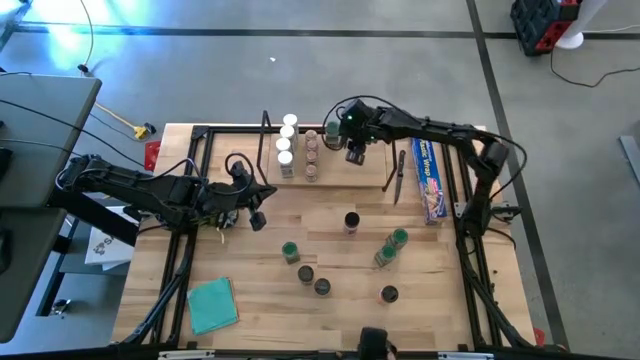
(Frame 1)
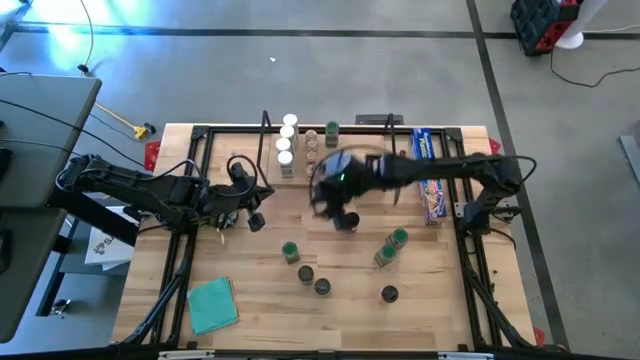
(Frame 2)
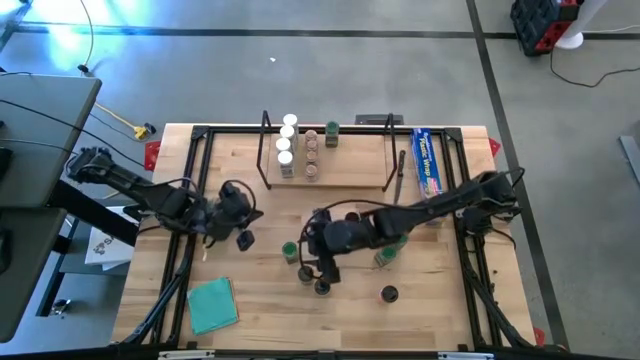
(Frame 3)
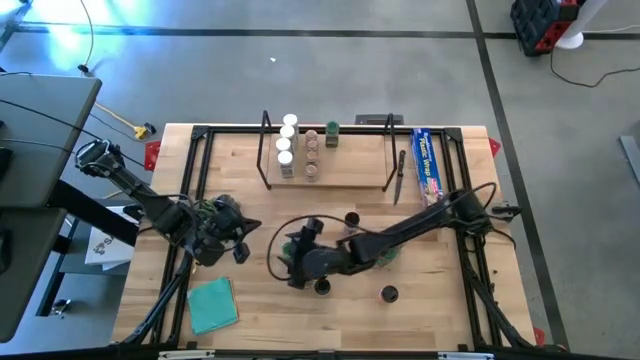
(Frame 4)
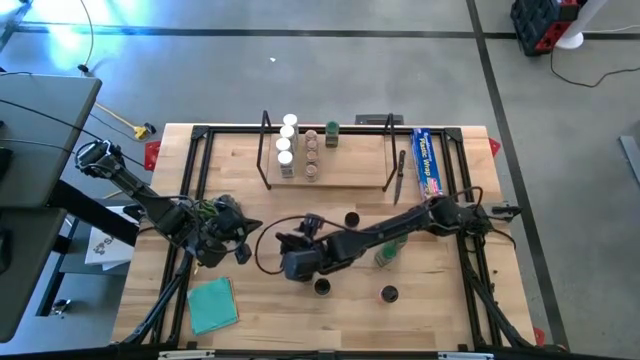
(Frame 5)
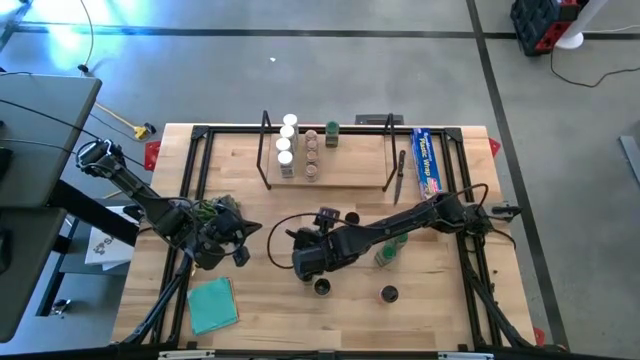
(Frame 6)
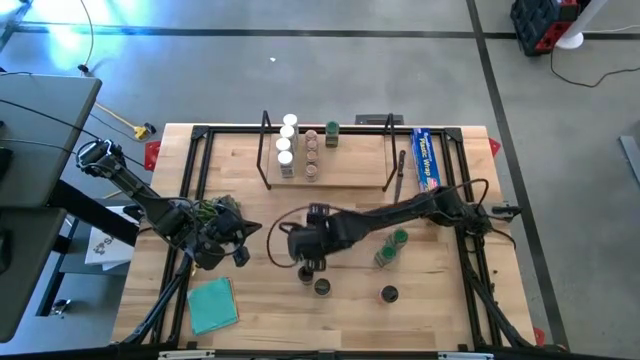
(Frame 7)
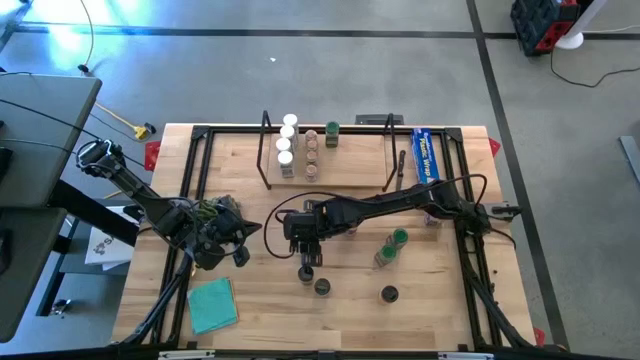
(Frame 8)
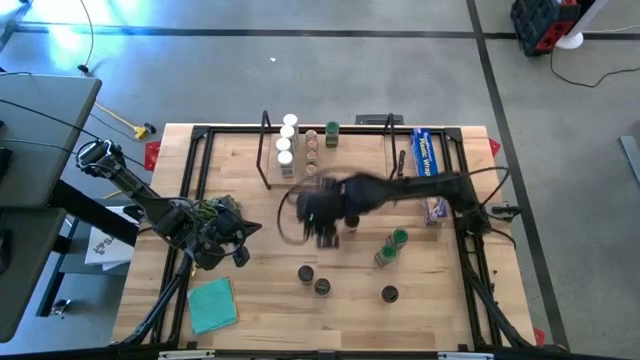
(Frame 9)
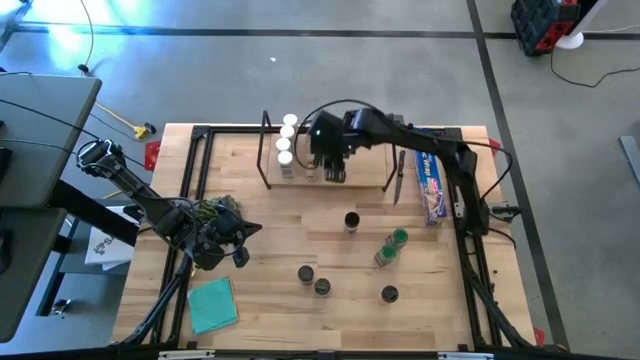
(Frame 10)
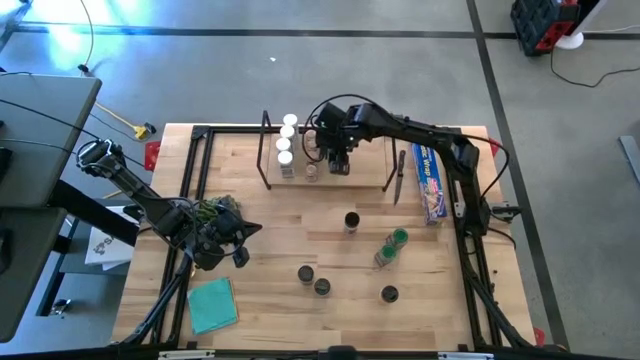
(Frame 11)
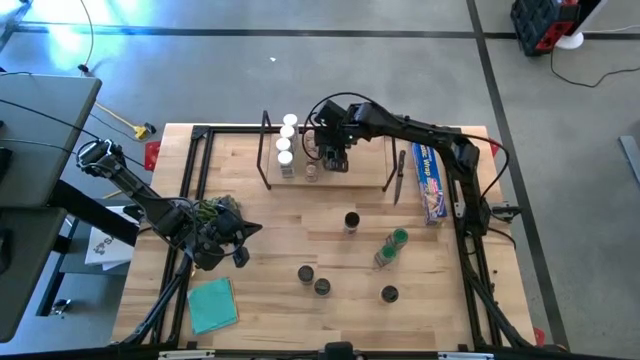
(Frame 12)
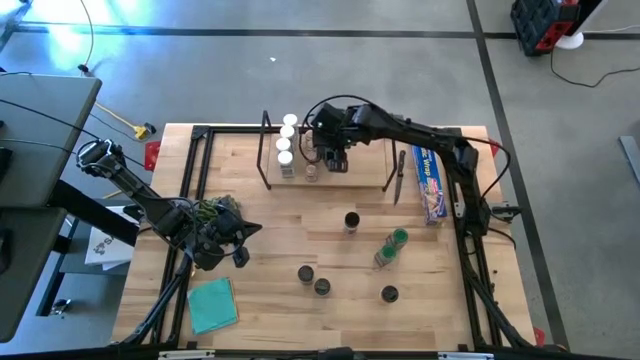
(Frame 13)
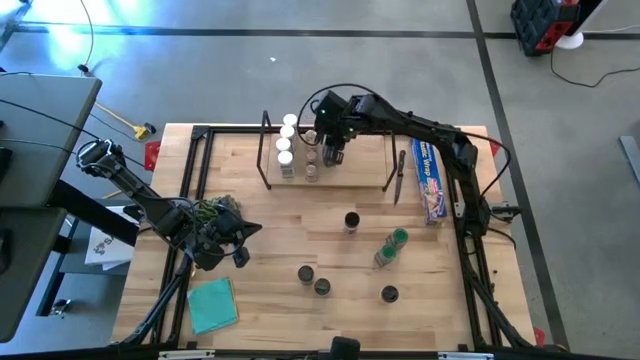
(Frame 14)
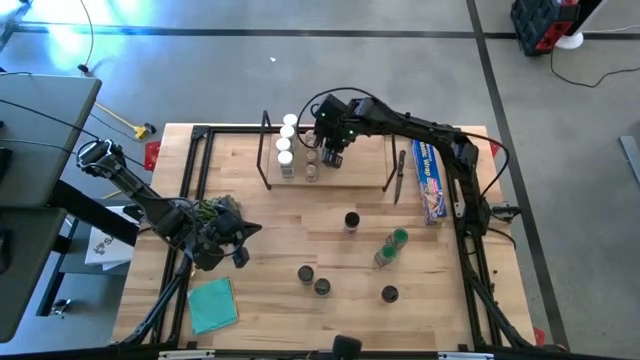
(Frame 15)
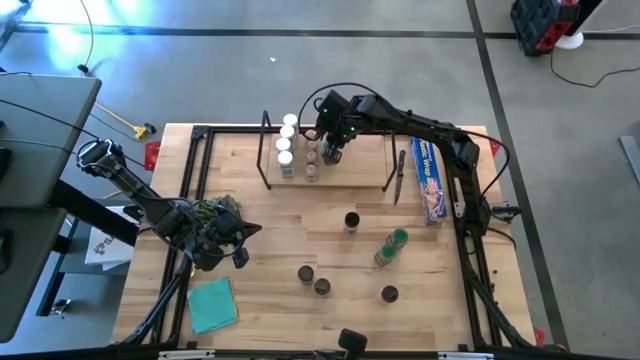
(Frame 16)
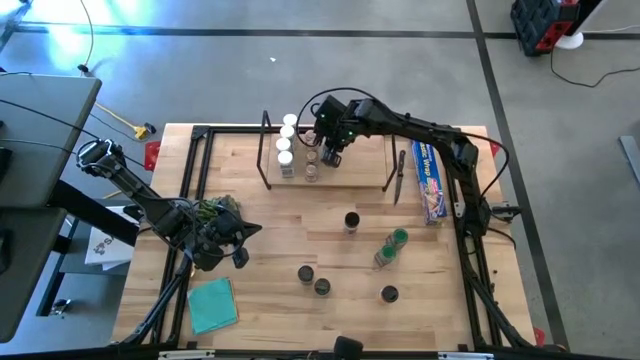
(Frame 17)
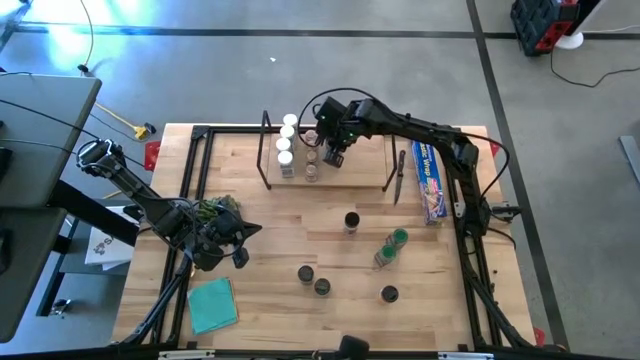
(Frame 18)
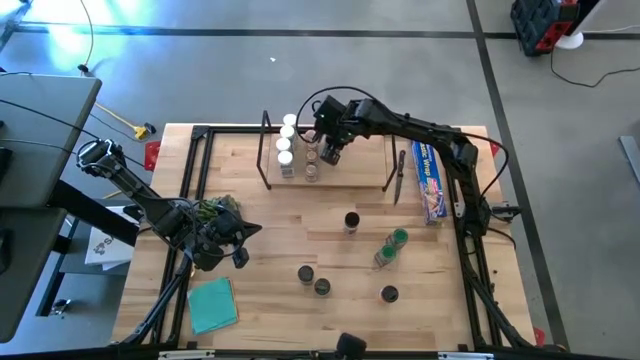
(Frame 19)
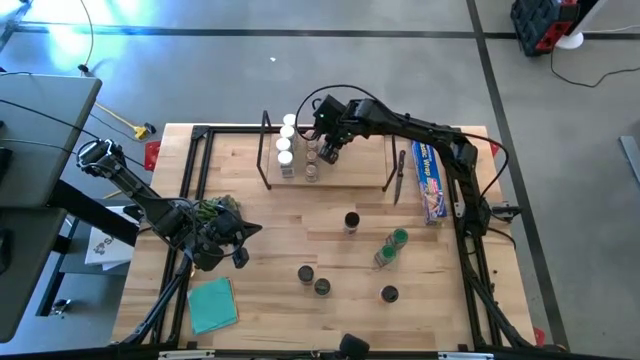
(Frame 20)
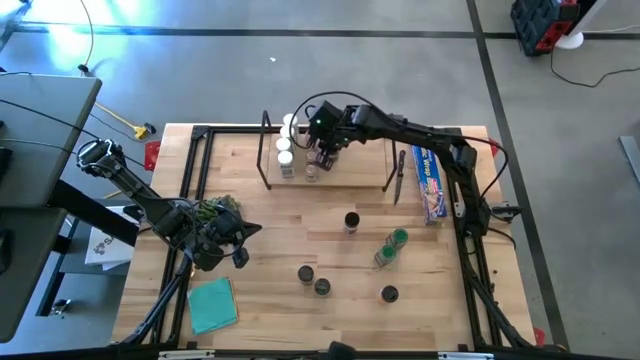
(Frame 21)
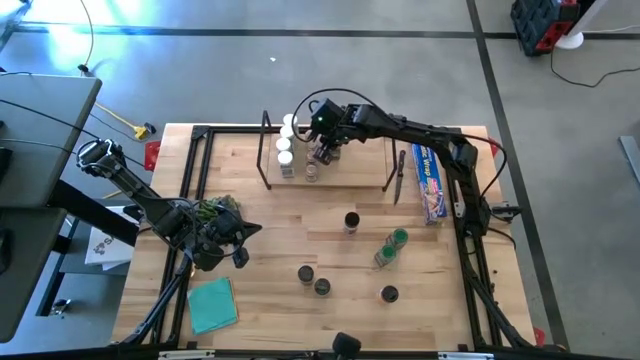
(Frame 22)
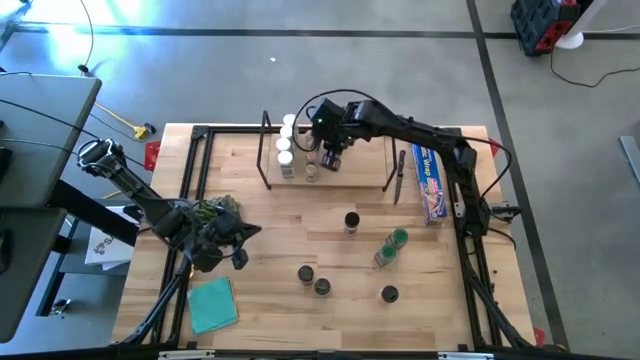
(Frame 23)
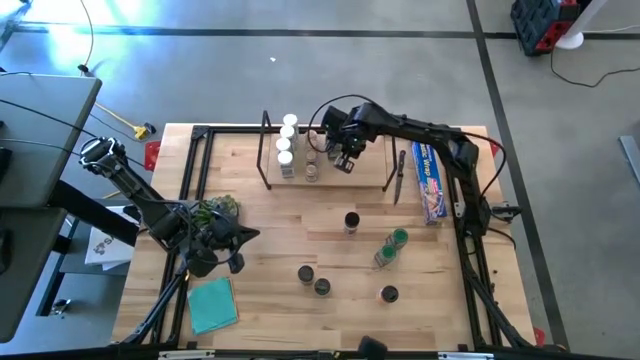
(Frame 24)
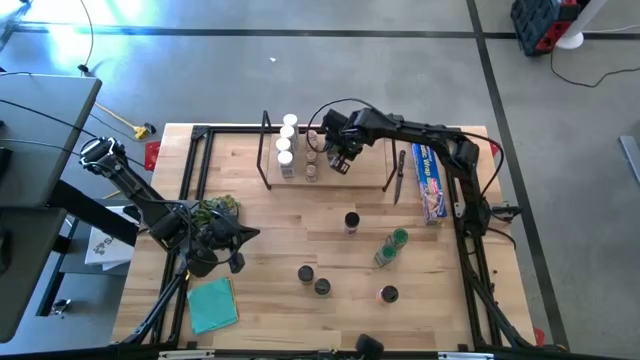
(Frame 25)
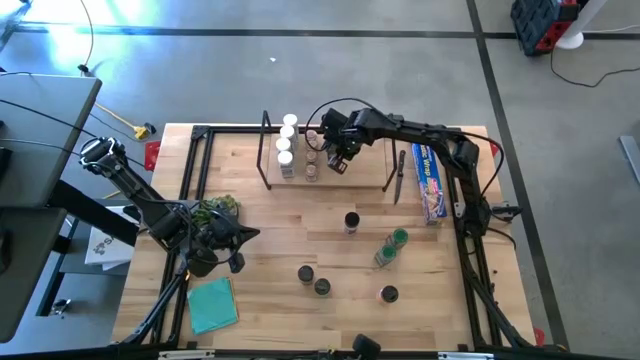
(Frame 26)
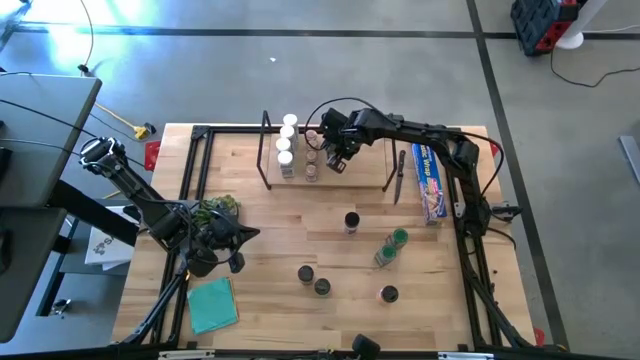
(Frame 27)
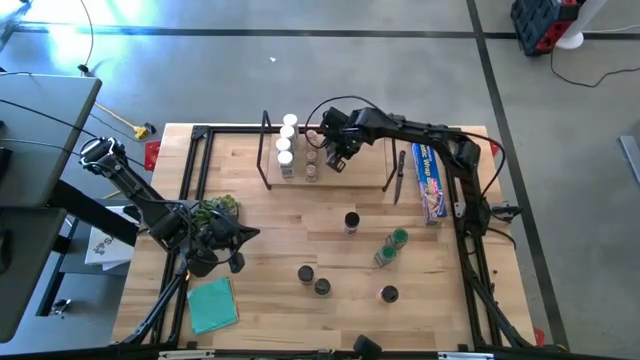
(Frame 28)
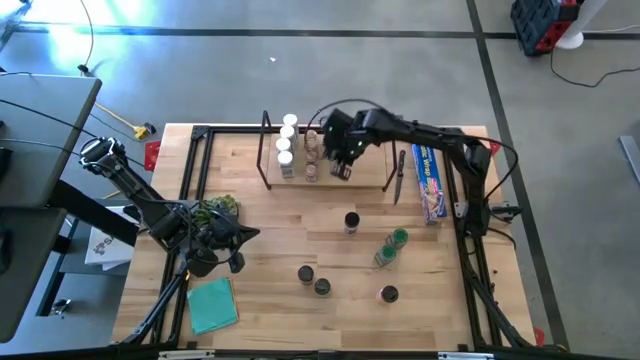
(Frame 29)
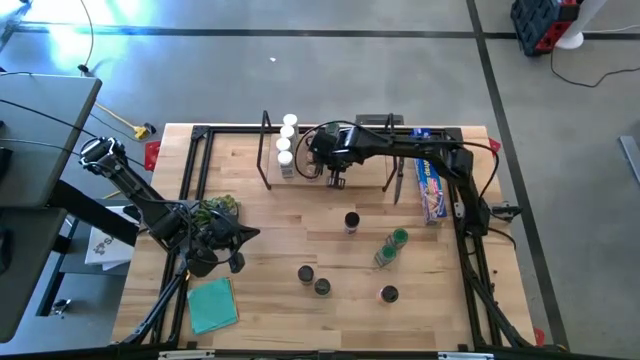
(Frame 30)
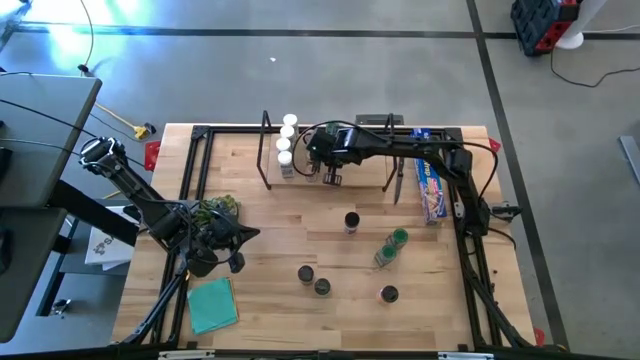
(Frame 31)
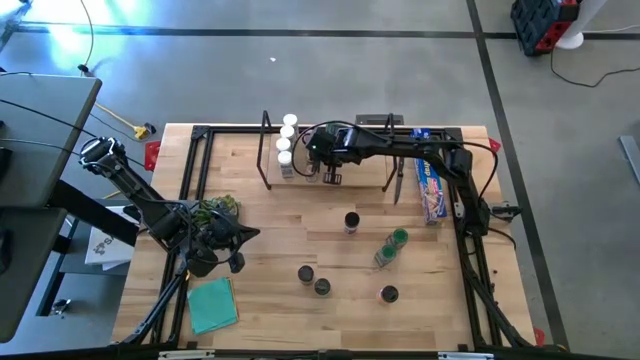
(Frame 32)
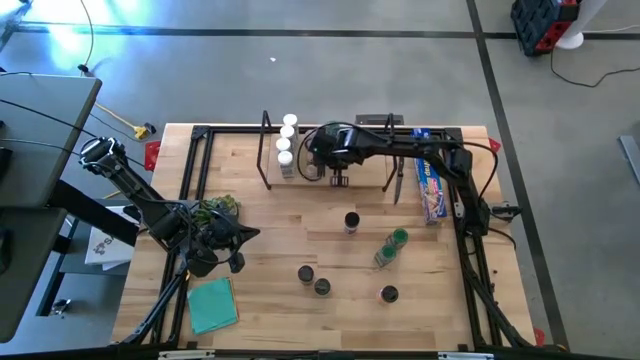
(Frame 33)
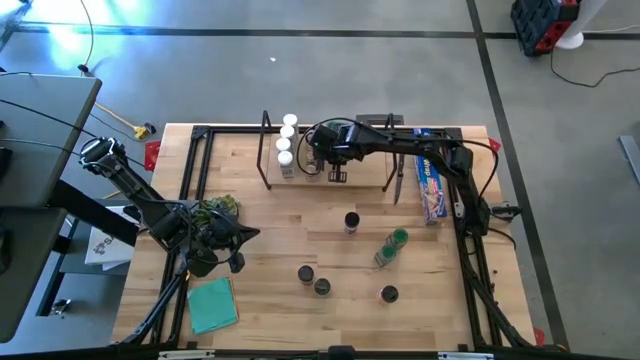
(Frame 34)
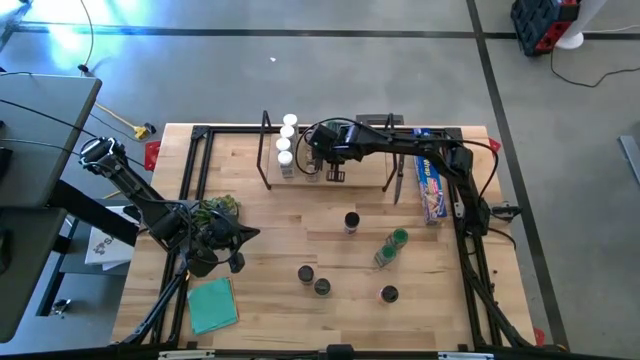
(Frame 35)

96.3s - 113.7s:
Task: Shelf spices
Put the green seasoning bottle on the shelf aligned with the other green seasoning bottle

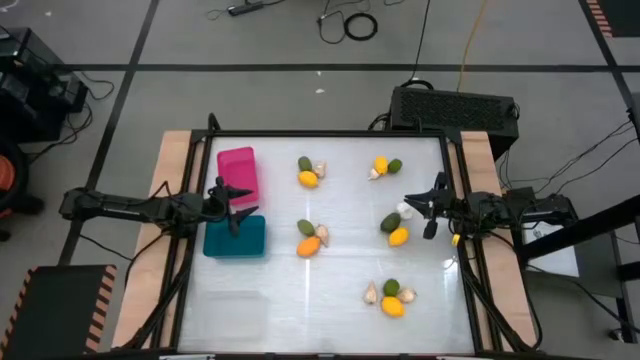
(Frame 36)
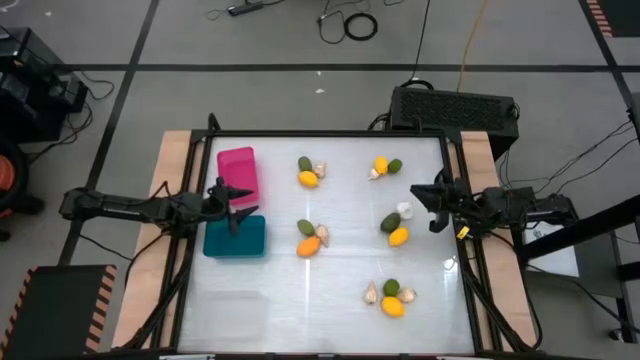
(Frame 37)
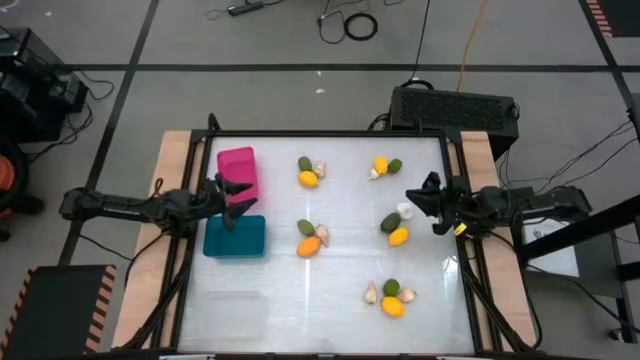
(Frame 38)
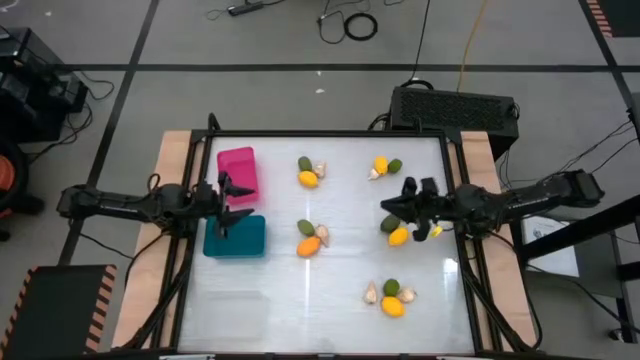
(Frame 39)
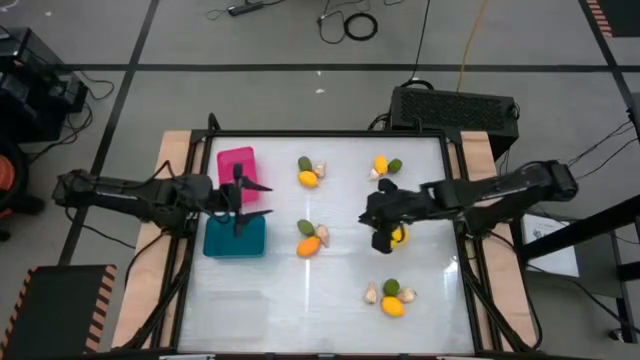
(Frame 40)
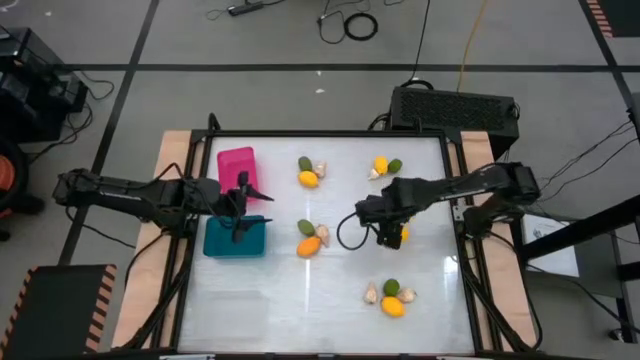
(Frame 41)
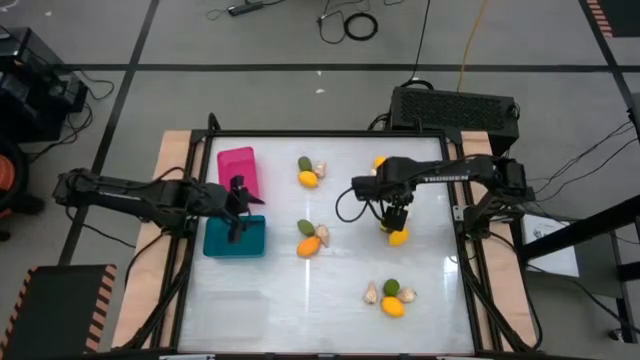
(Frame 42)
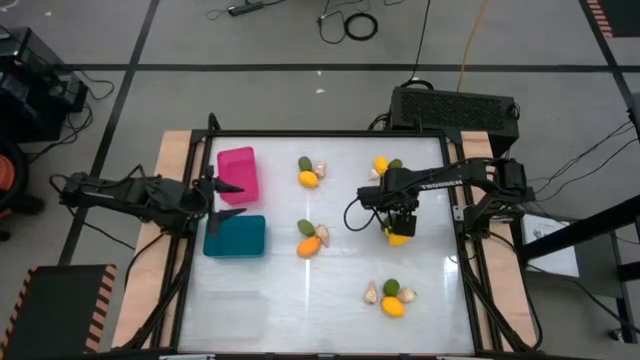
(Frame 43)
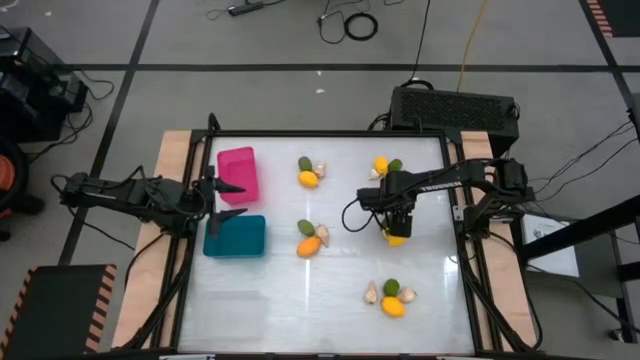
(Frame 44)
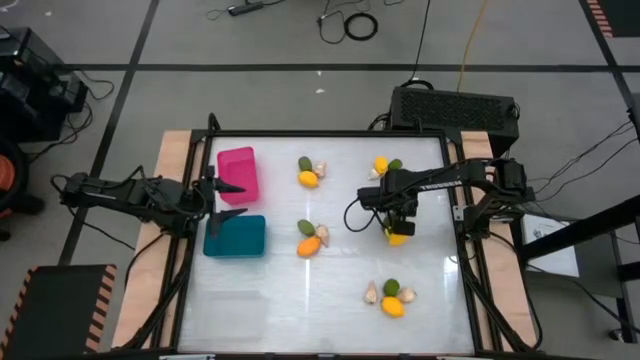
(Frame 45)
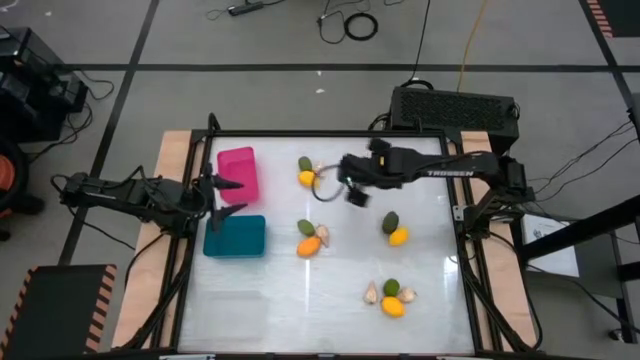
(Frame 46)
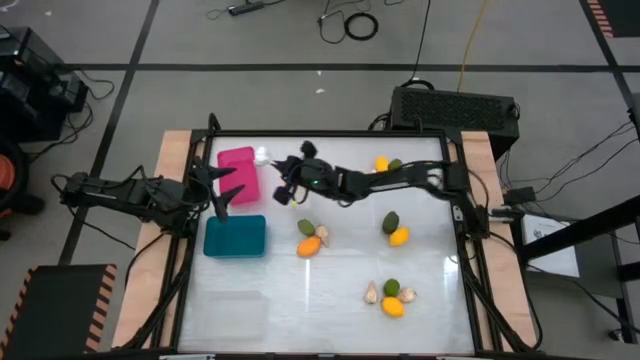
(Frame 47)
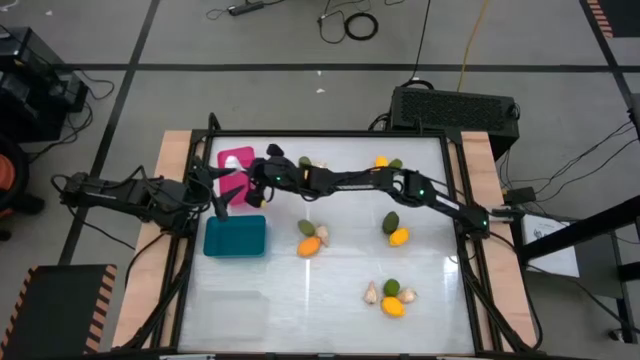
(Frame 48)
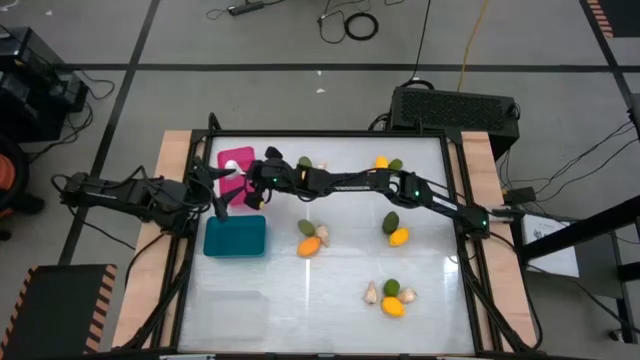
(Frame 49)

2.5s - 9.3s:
Task: Sort produce into baskets
Put the white garlic into the pink bin
